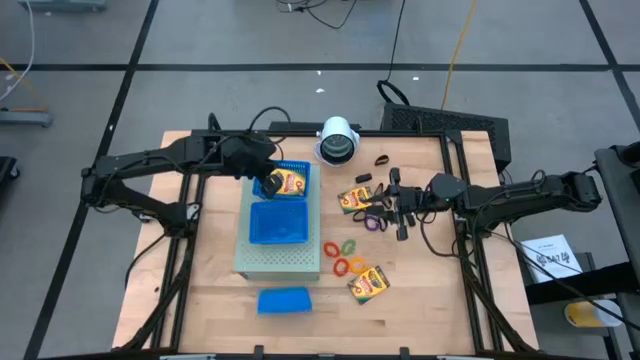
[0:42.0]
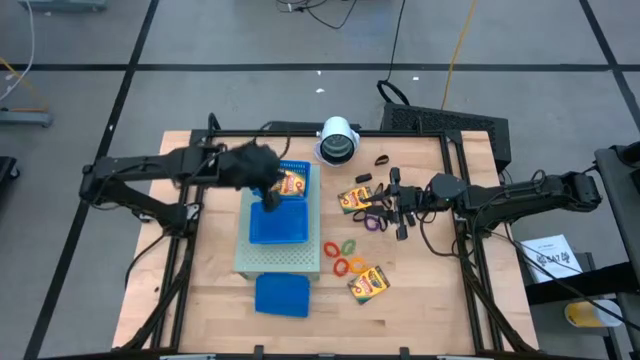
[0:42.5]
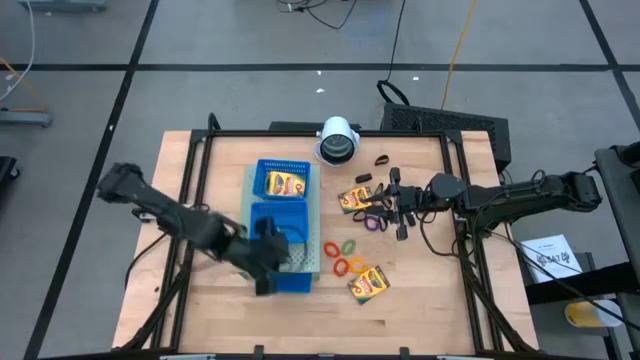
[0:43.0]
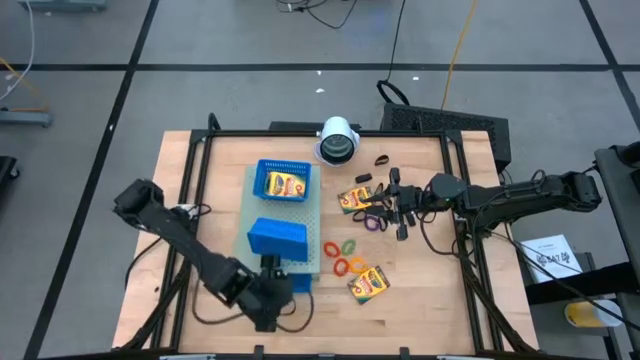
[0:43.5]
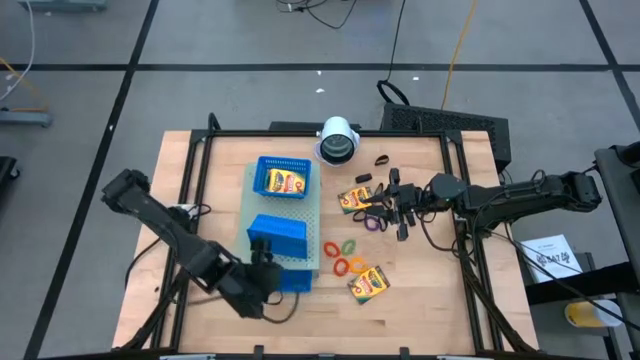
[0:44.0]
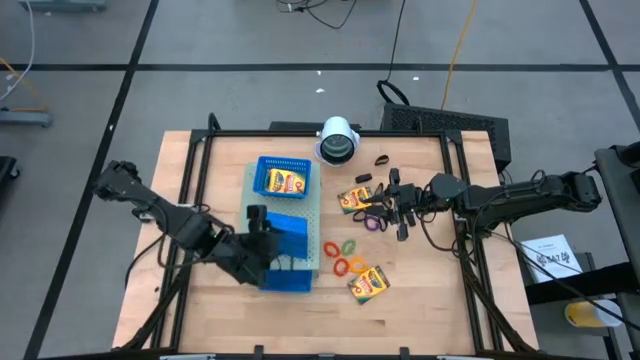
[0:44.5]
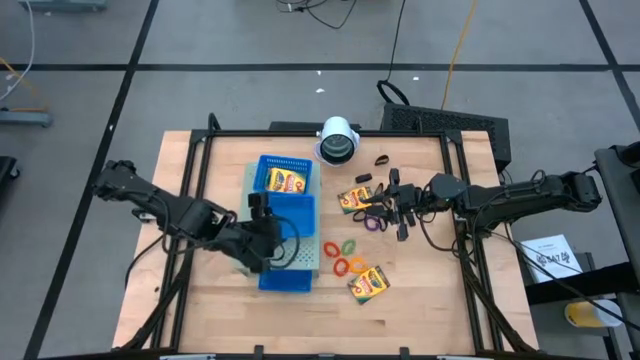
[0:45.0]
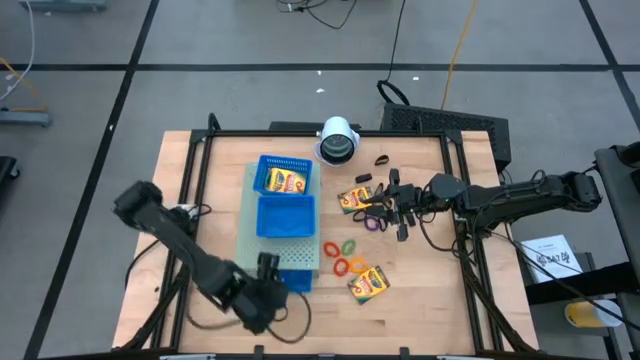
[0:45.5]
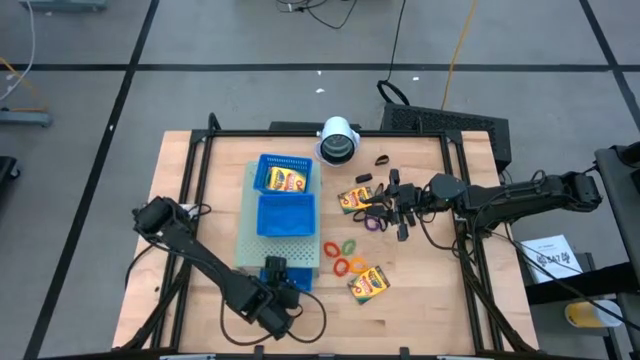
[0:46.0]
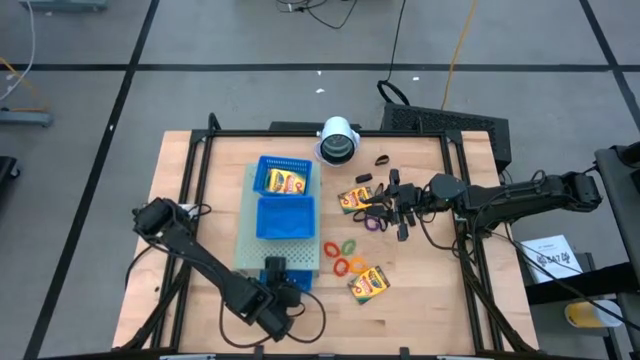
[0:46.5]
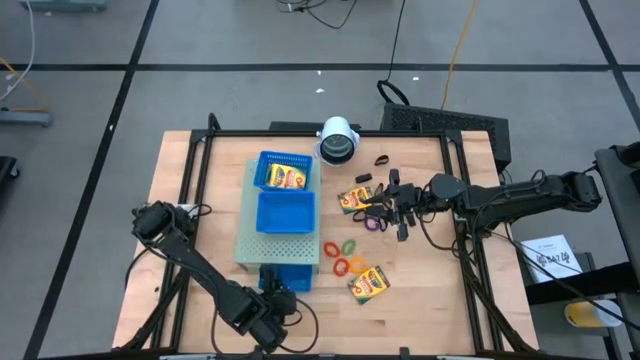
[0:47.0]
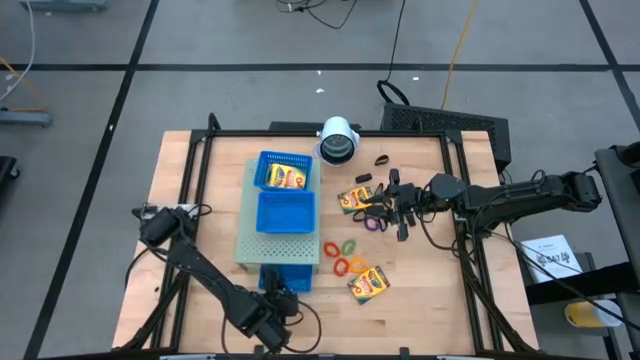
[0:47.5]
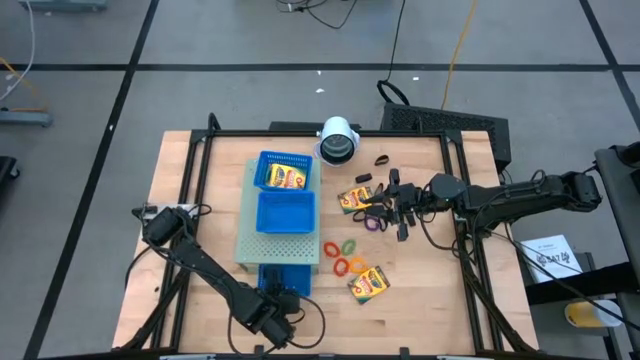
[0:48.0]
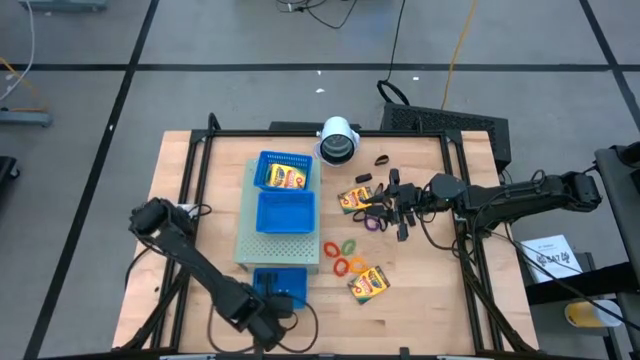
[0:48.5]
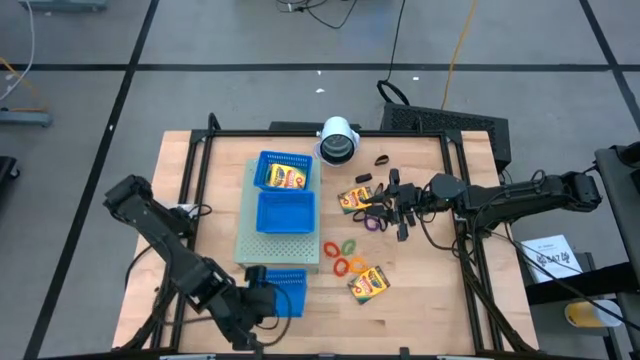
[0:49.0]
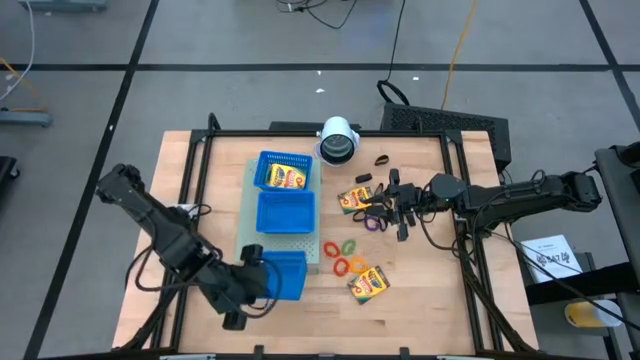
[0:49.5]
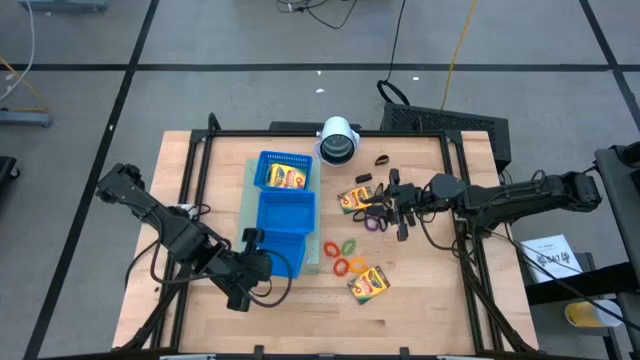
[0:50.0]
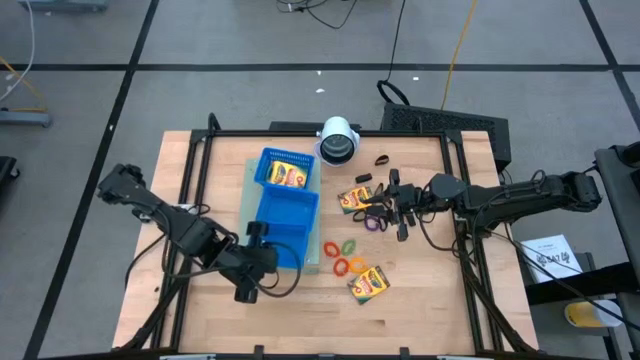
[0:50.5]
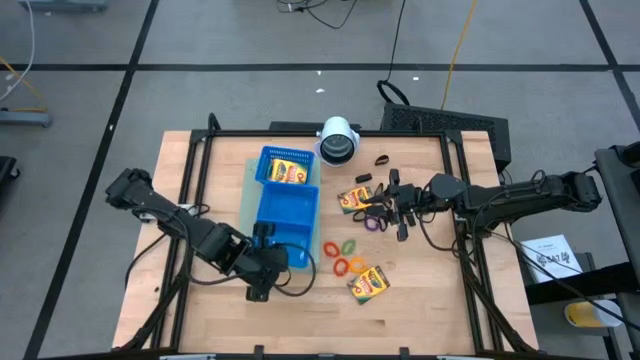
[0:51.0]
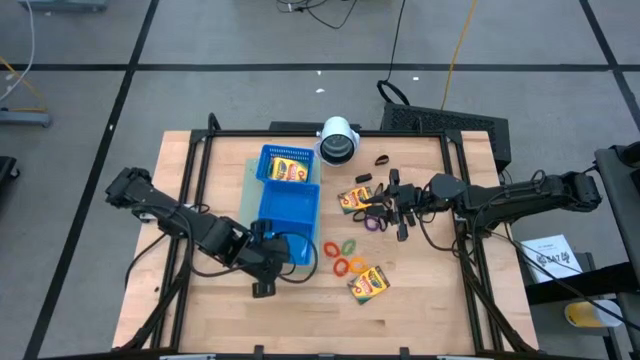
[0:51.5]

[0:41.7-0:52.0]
Task: Pick & Place Office Desk Supplies
Put the blue bin on the shelf

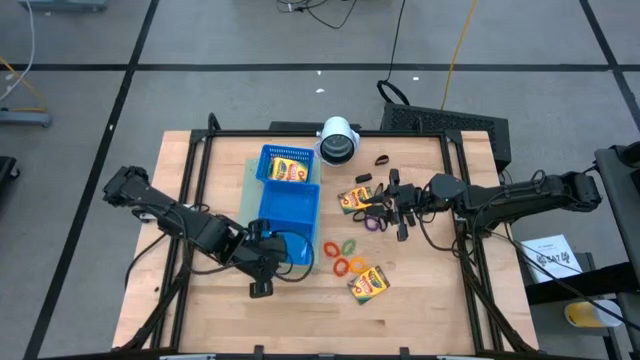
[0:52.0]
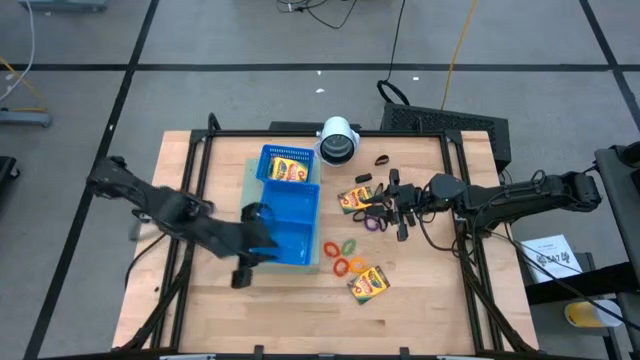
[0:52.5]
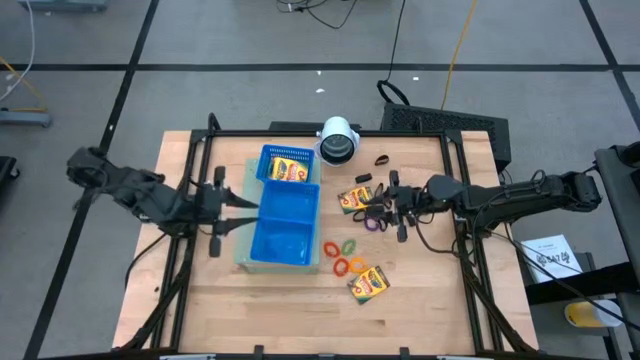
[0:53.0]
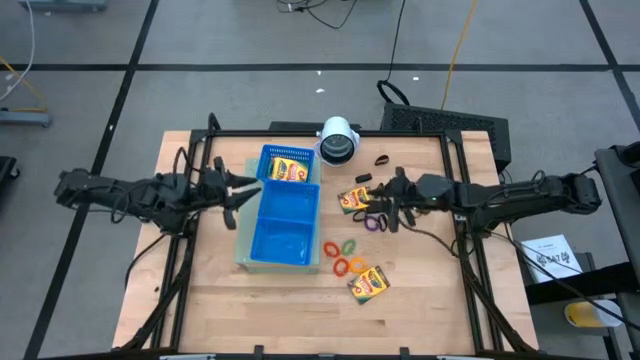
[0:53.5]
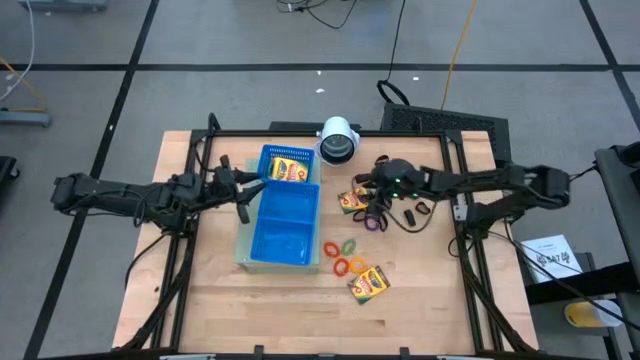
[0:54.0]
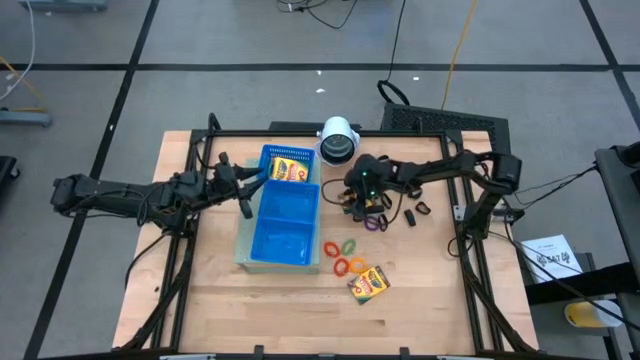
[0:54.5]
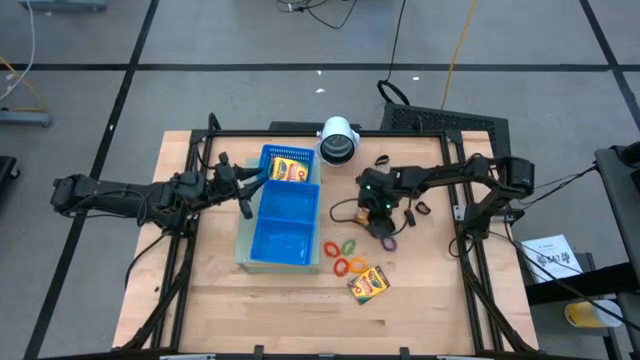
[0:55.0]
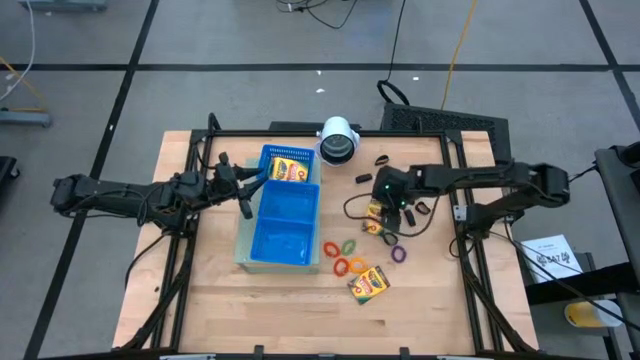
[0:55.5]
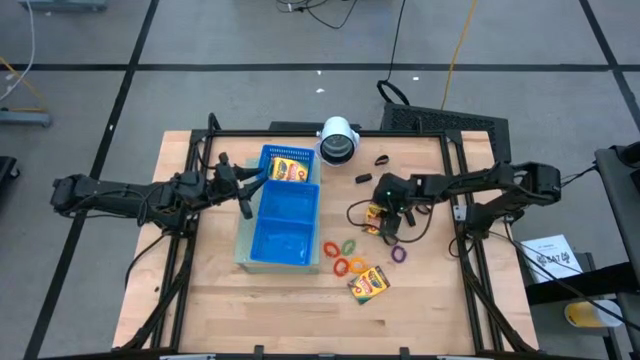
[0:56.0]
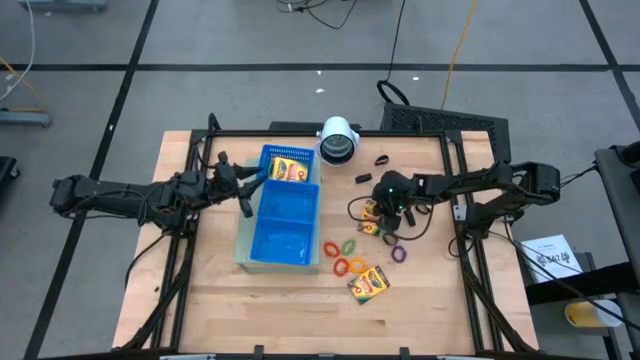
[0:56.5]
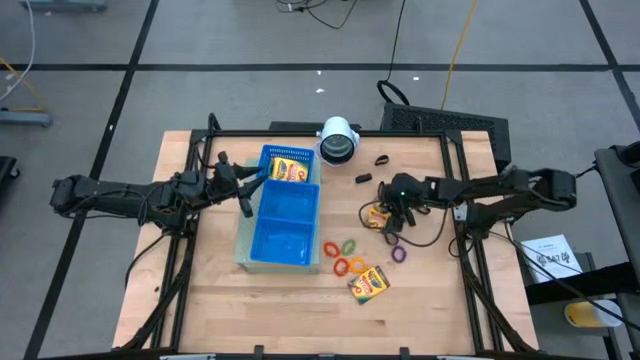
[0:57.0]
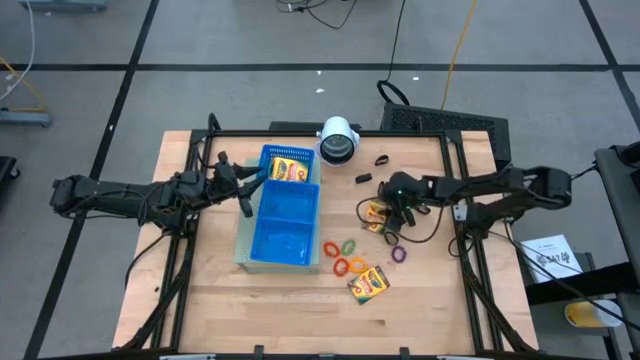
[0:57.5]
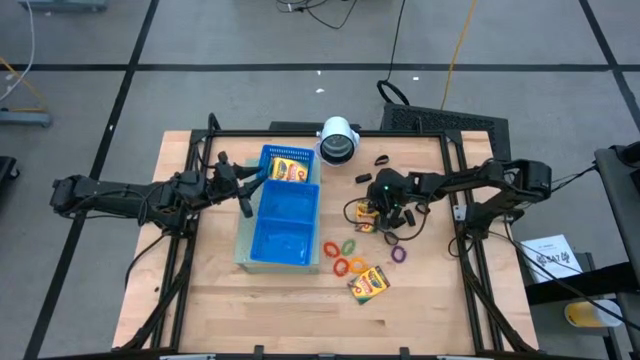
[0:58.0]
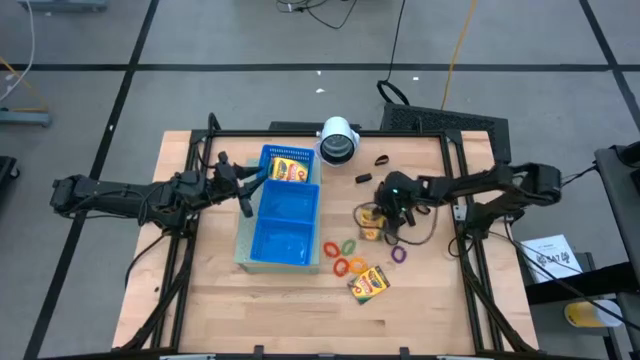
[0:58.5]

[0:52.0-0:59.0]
Put the crayon box into the top blue bin on the shelf

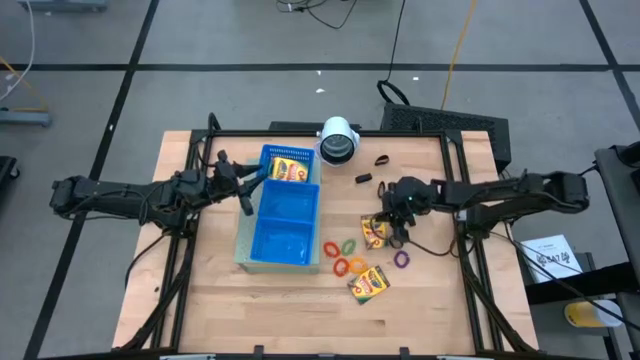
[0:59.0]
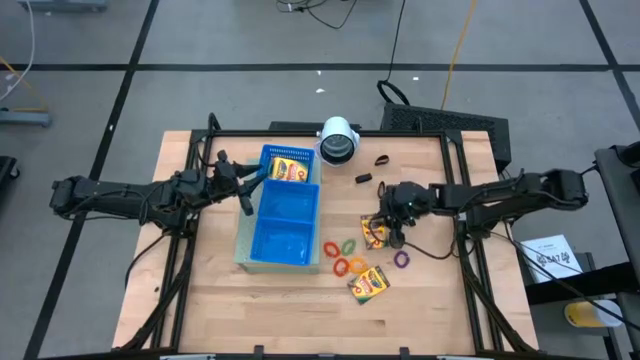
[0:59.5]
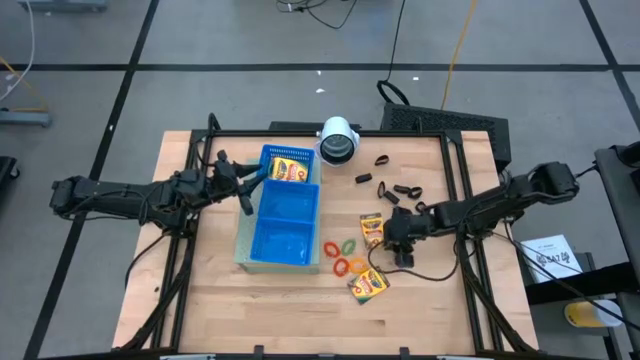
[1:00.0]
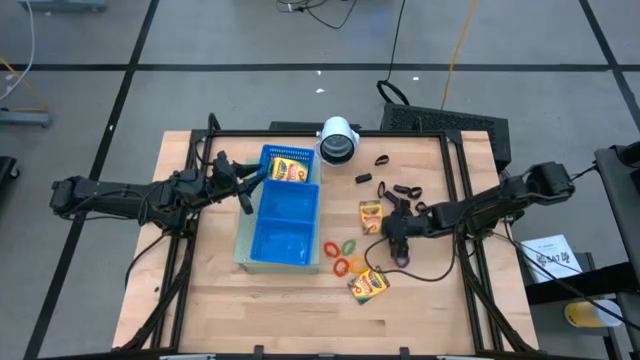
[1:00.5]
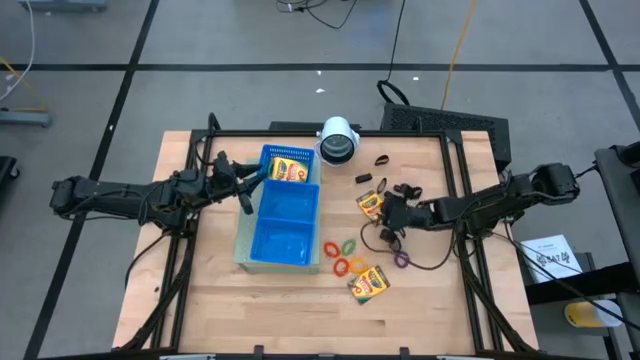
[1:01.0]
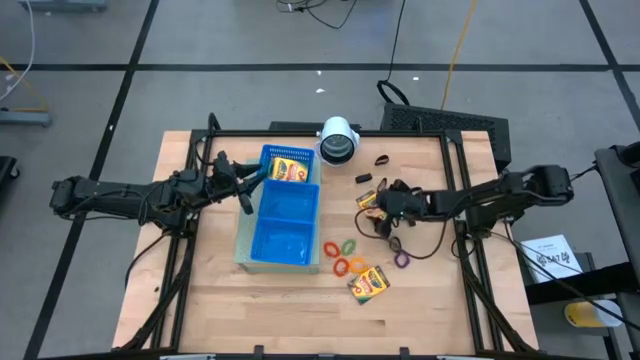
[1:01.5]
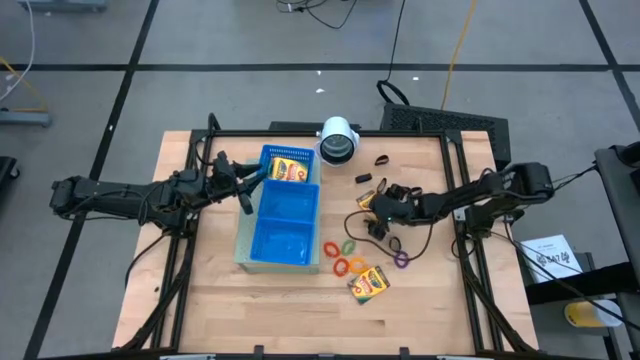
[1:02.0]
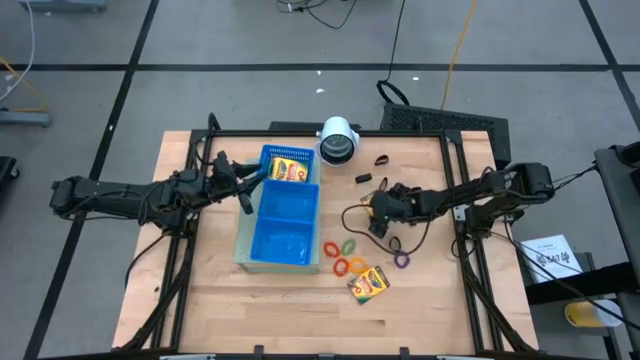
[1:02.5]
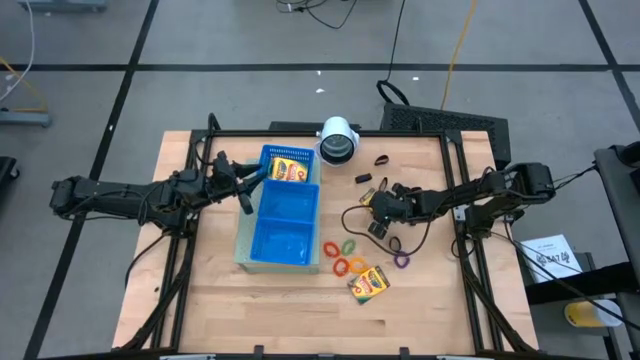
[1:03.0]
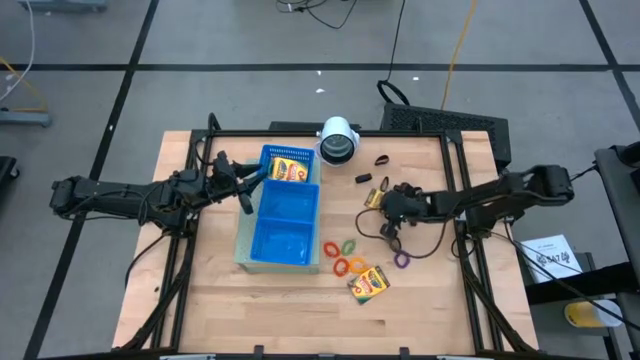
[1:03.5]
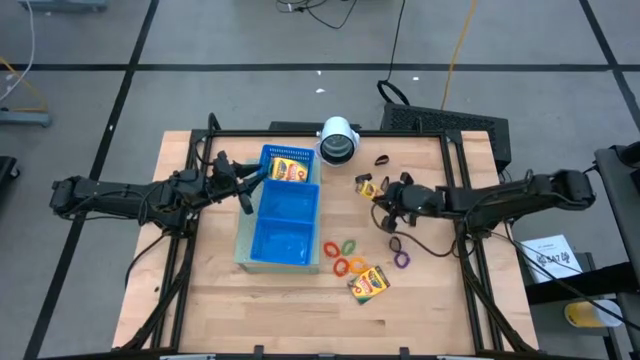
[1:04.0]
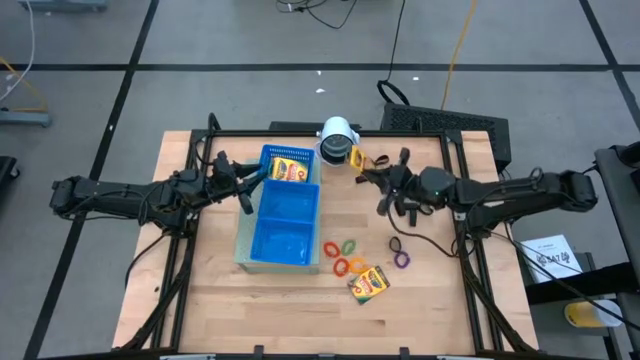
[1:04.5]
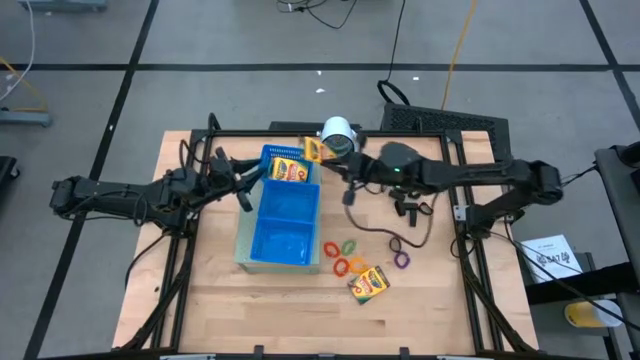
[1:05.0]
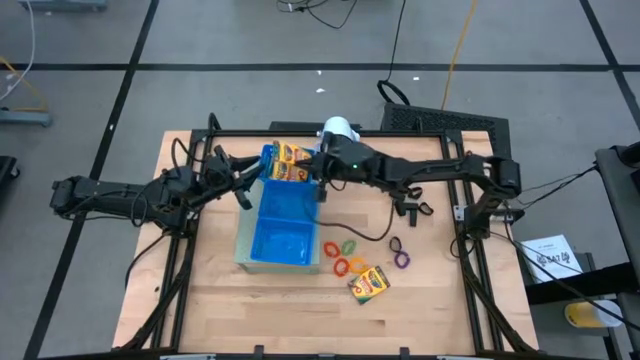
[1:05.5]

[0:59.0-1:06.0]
Put the crayon box into the top blue bin on the shelf
